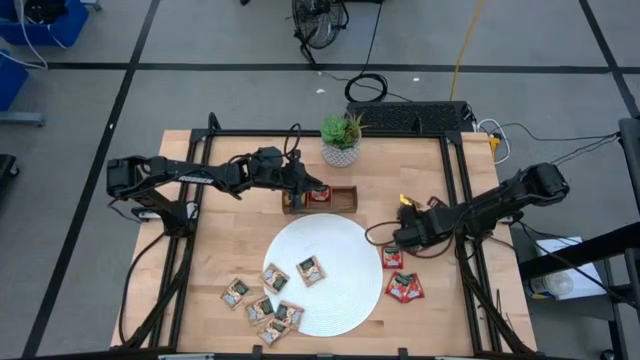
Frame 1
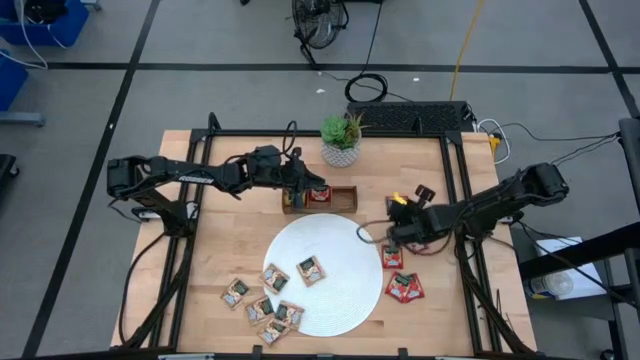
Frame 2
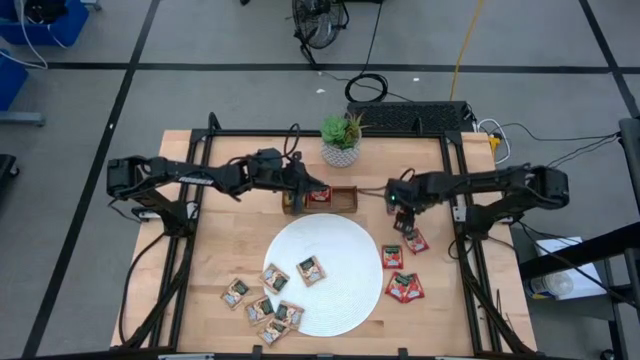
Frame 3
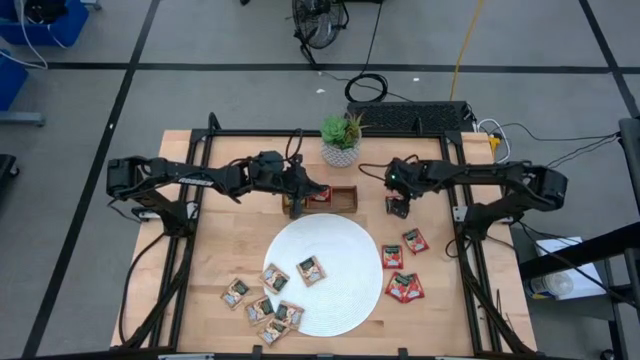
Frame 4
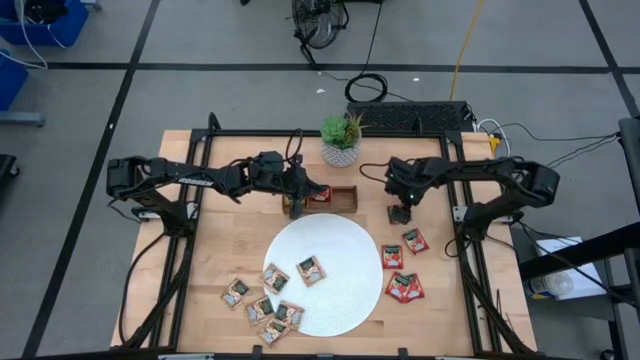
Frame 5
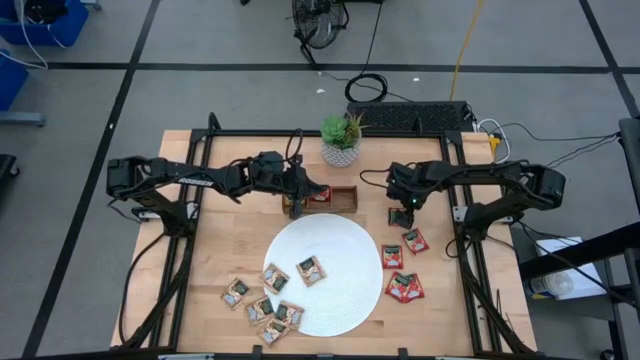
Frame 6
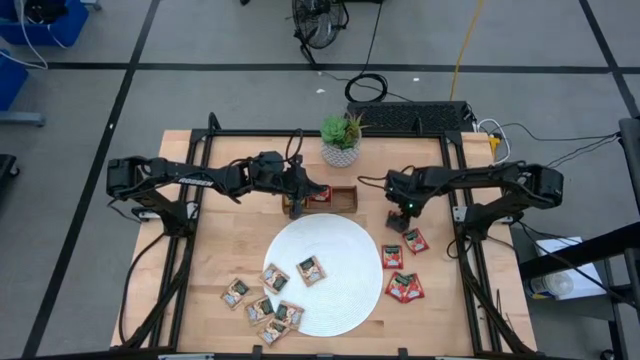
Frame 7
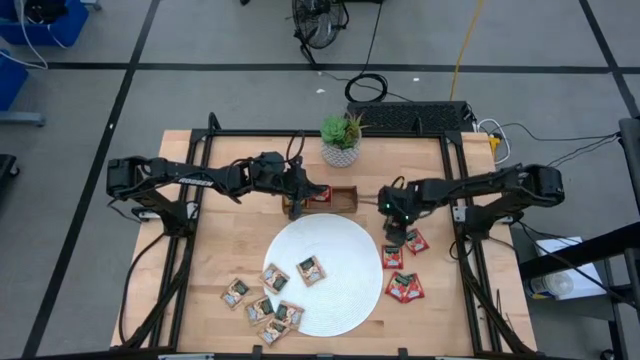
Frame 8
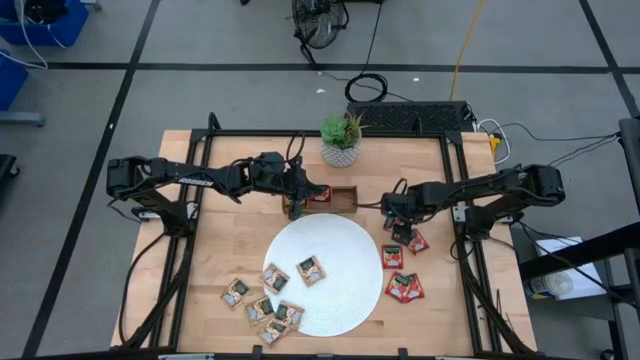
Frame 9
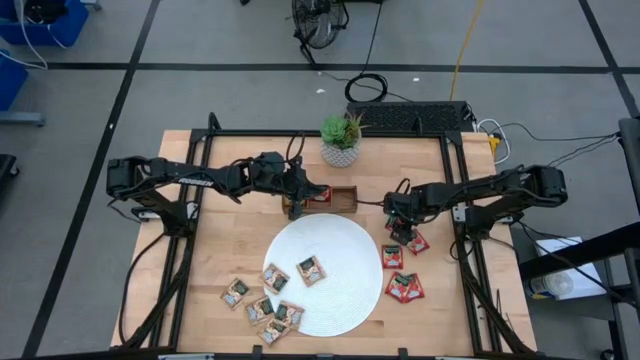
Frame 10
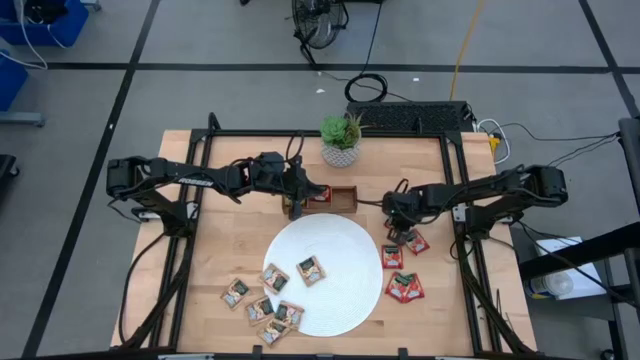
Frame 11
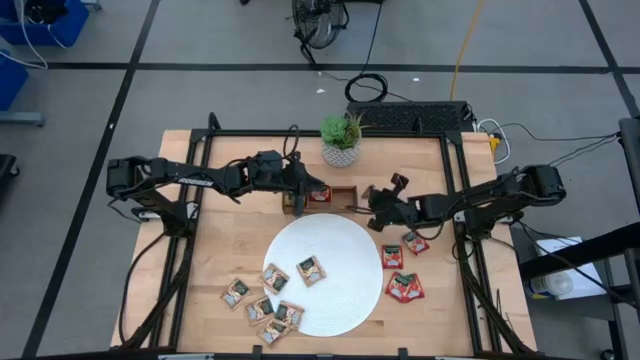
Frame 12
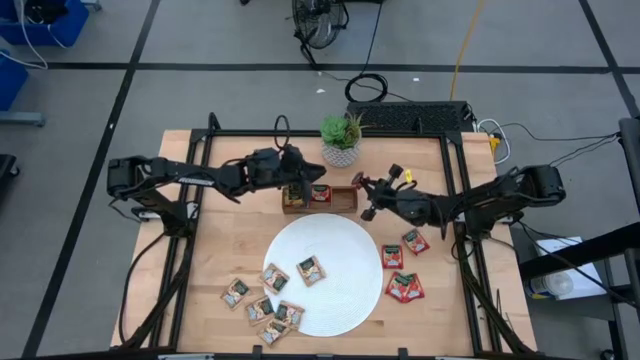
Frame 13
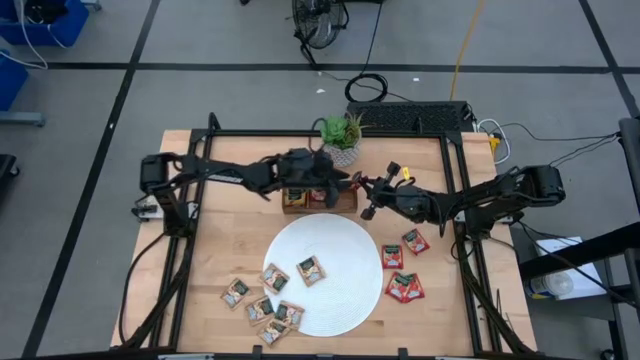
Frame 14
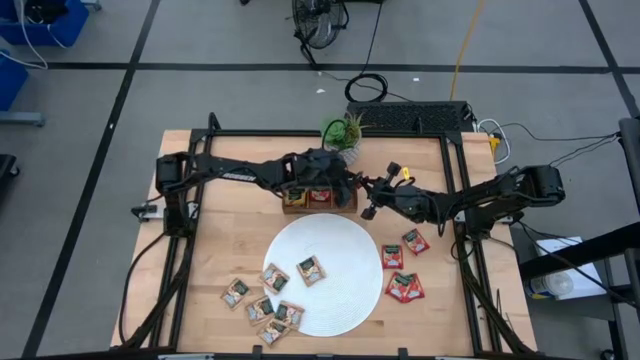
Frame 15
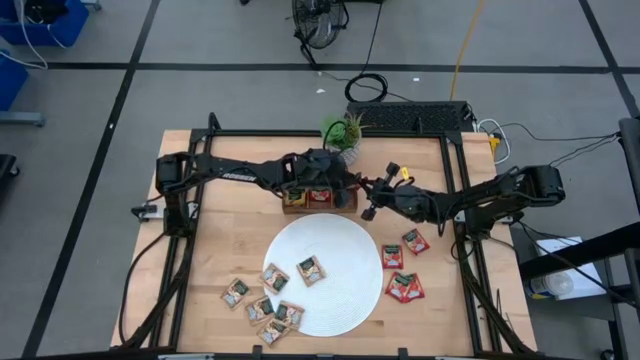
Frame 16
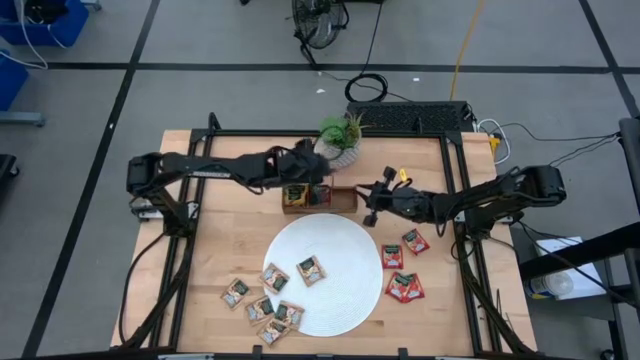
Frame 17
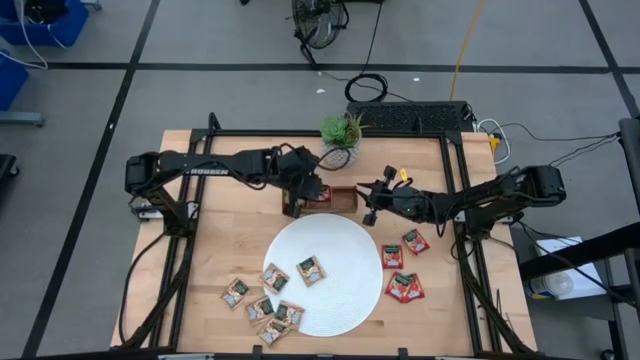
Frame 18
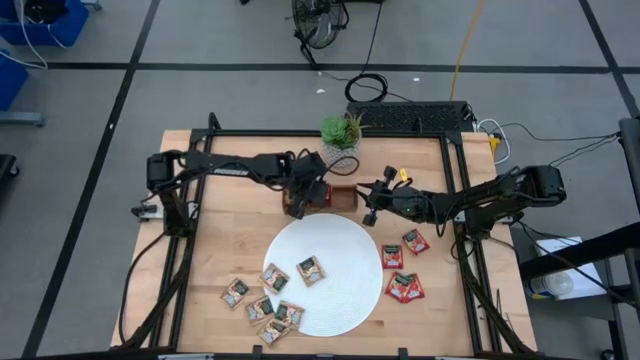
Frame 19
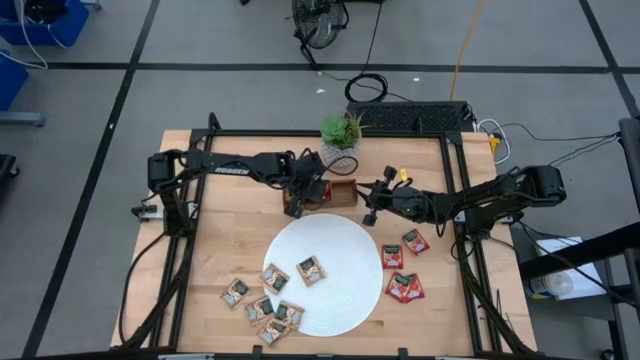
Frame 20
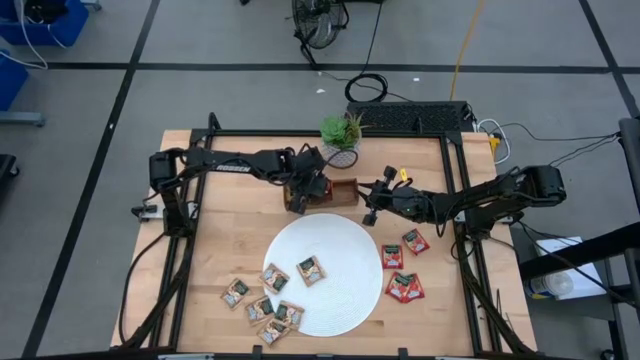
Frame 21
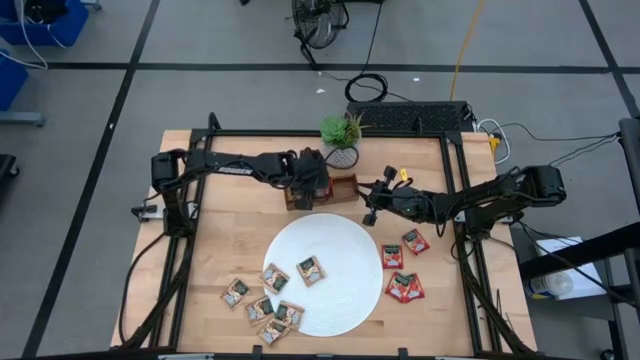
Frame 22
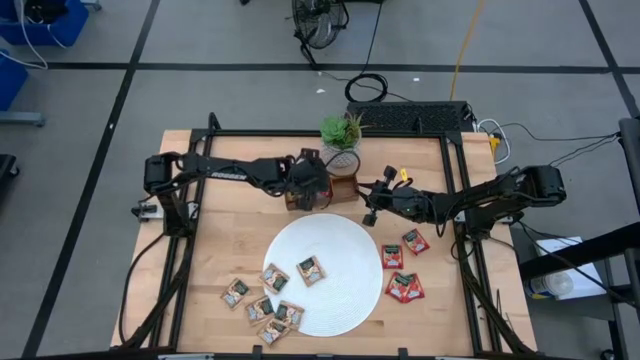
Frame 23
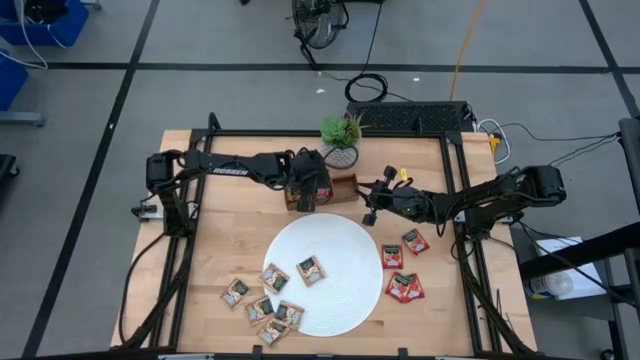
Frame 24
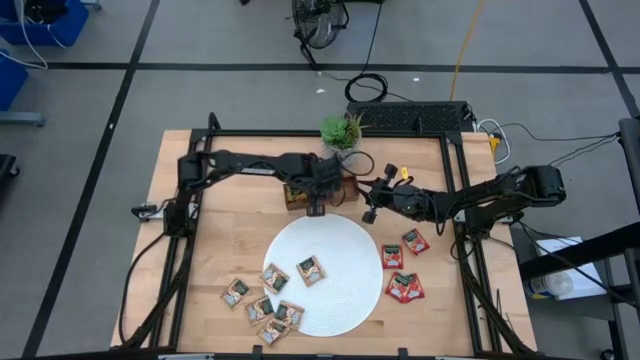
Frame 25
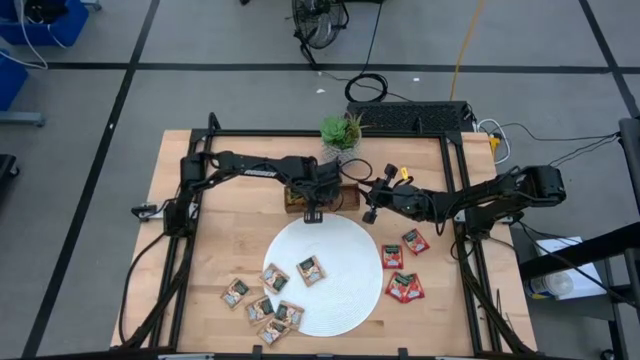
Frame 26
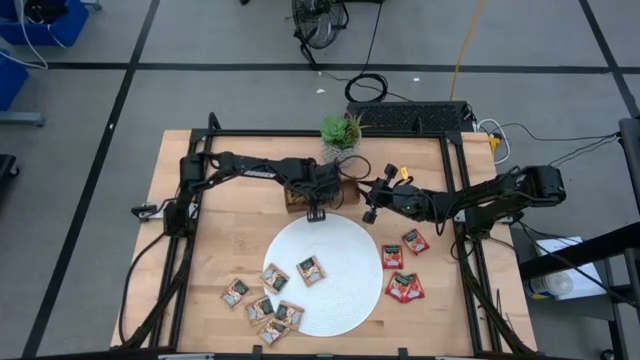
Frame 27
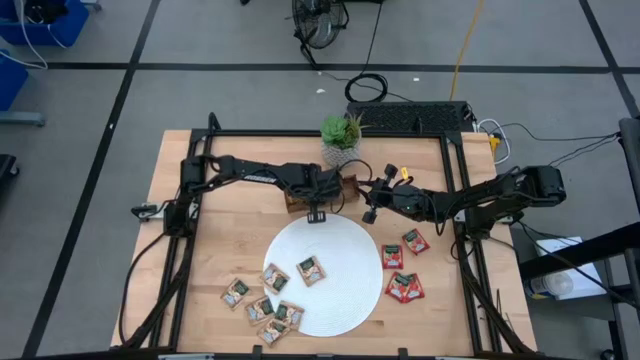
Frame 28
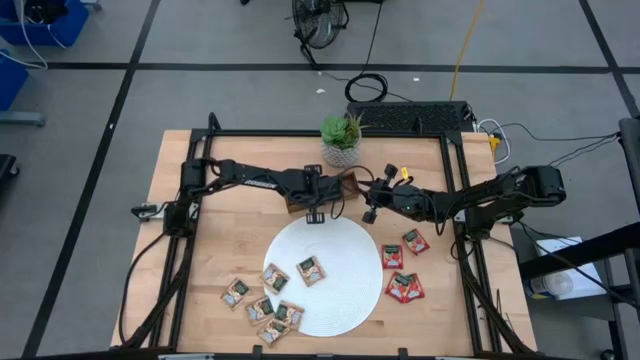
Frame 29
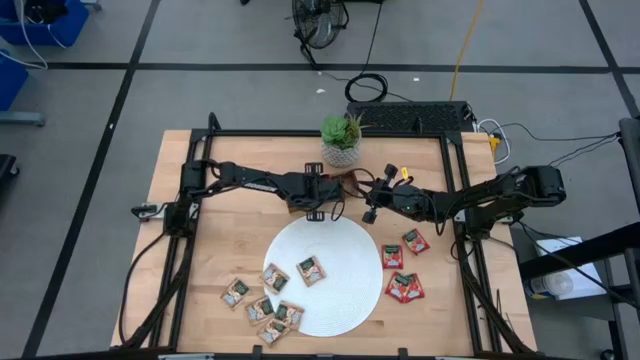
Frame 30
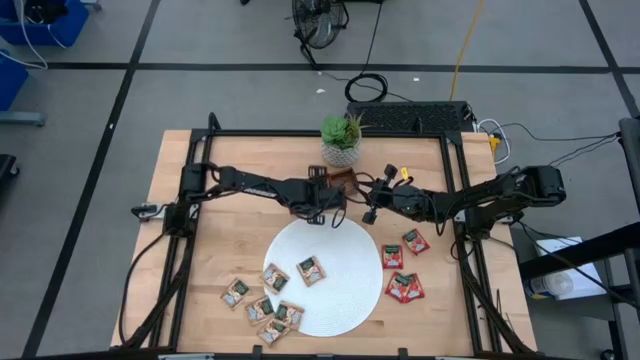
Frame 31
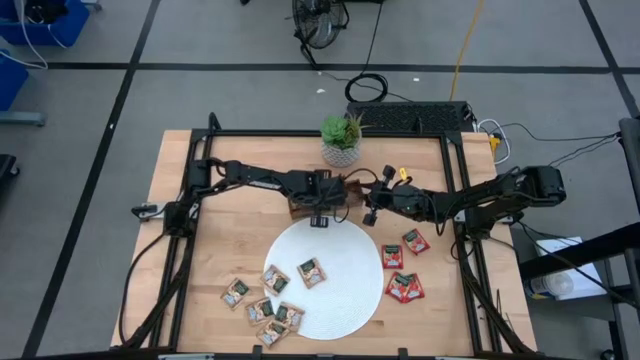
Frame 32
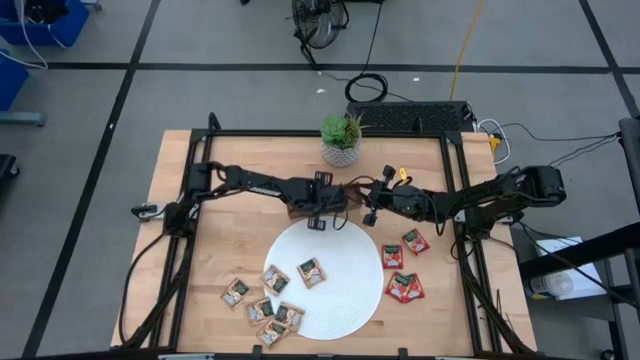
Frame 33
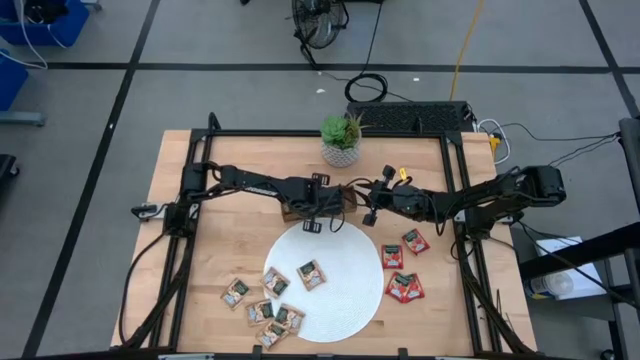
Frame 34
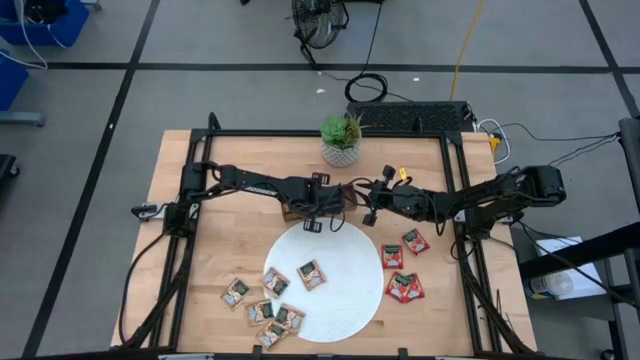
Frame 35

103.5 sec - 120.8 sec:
Task: Pick & Place Tea
Put the strawberry tea bag into the wooden organizer

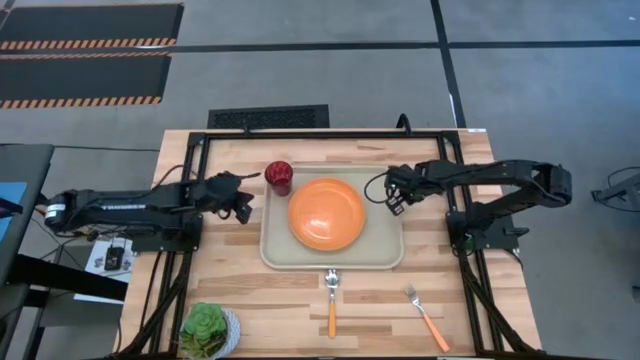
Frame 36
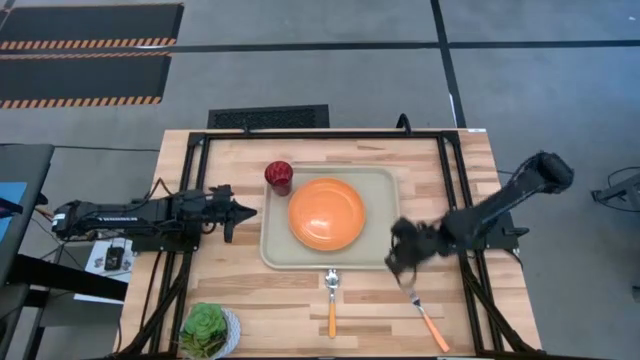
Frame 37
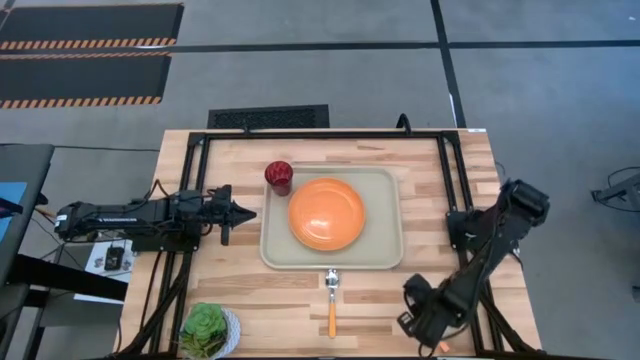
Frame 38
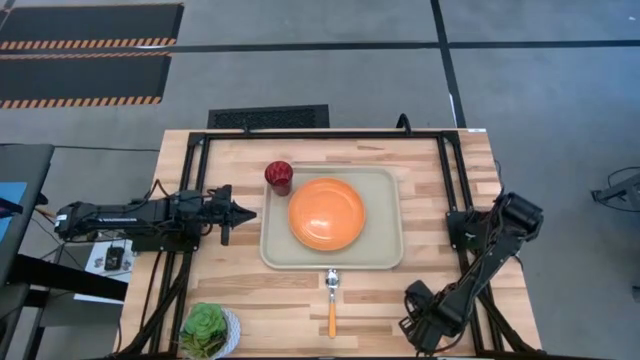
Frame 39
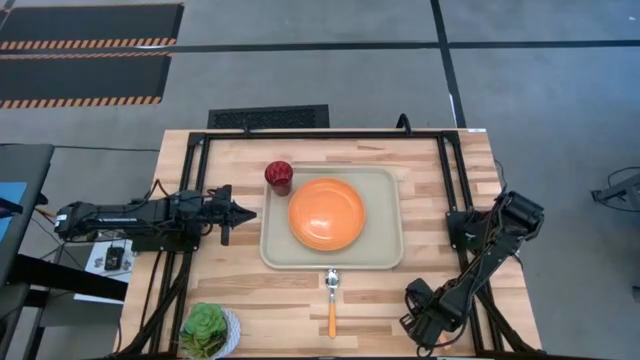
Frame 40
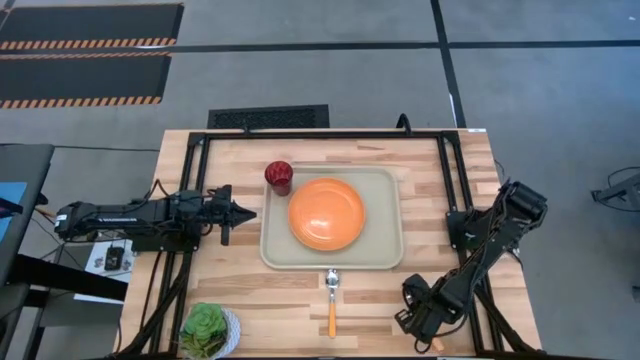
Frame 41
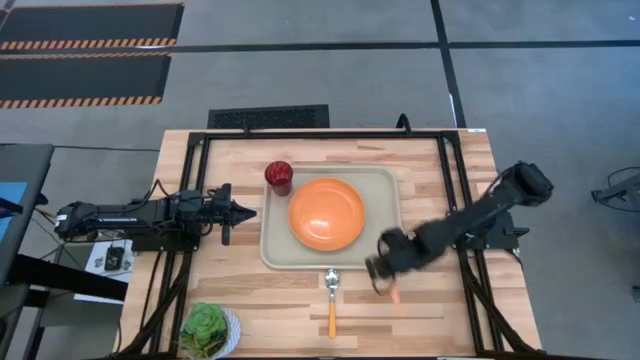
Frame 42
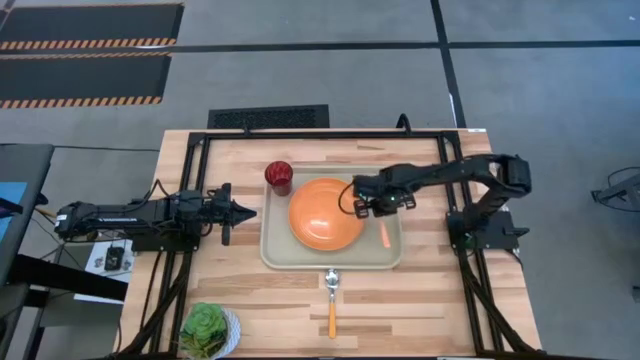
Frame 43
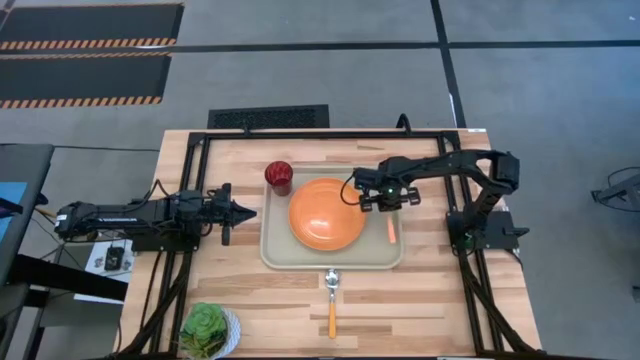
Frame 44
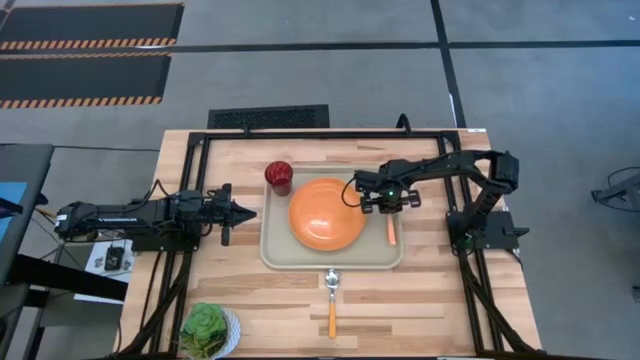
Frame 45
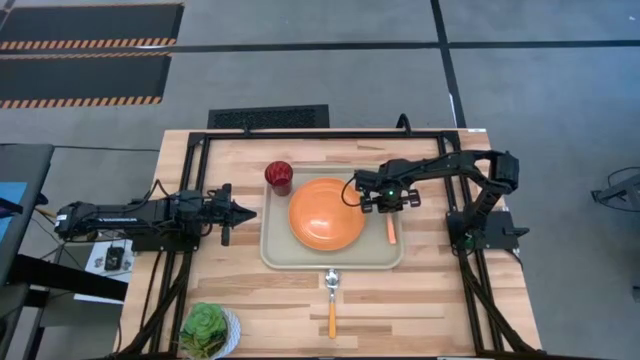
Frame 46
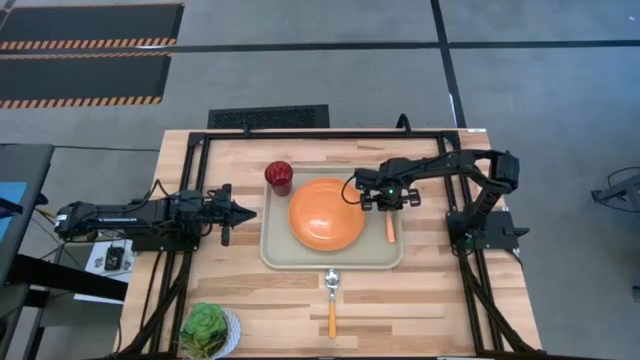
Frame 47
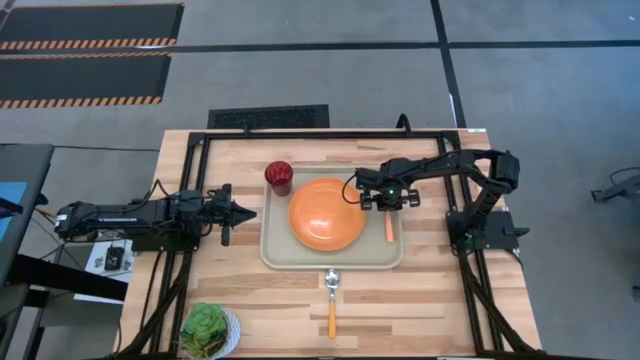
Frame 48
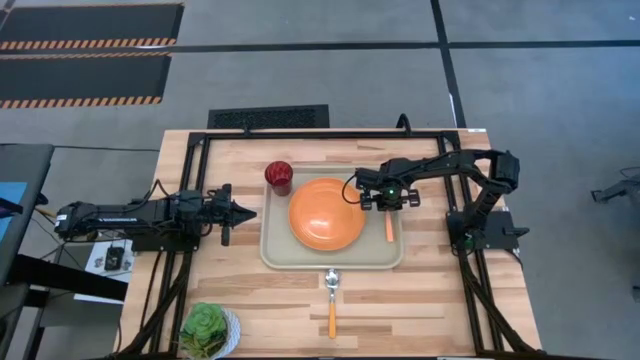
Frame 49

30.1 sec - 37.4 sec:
Task: Pick and place plate/cup/fork/spoon on tray
Put the orange fork to the right of the gray serving tray
